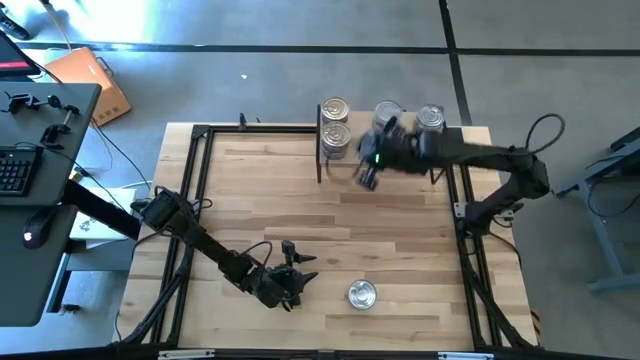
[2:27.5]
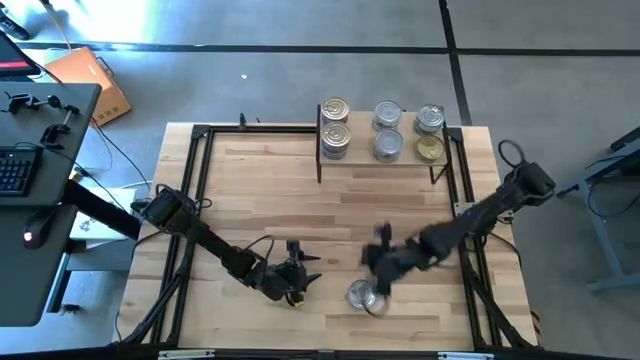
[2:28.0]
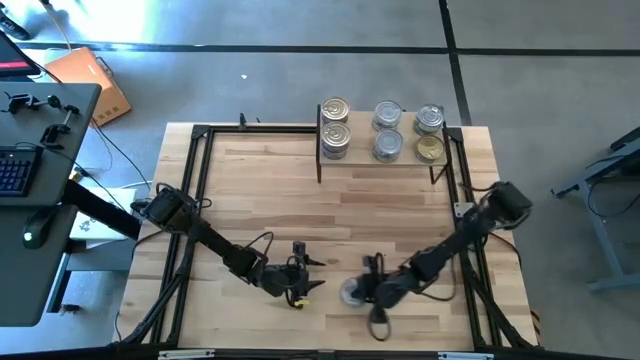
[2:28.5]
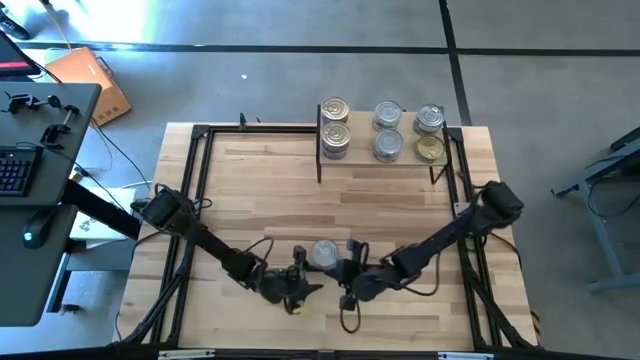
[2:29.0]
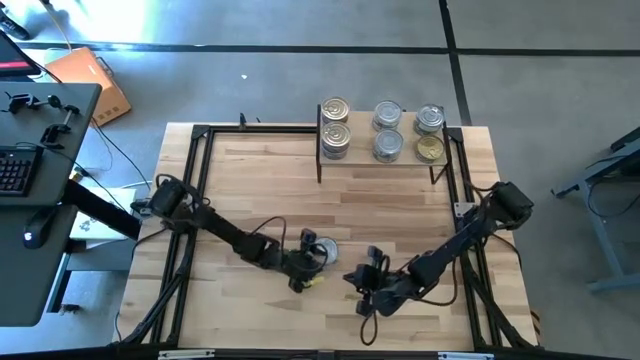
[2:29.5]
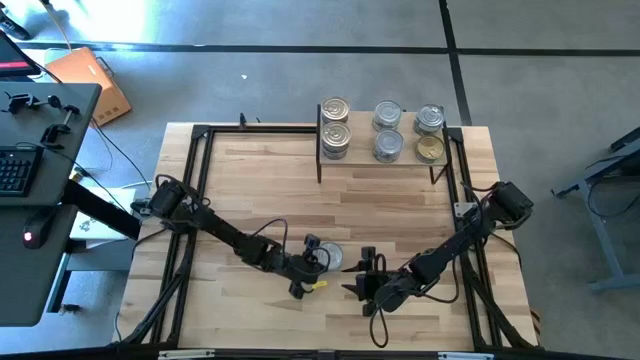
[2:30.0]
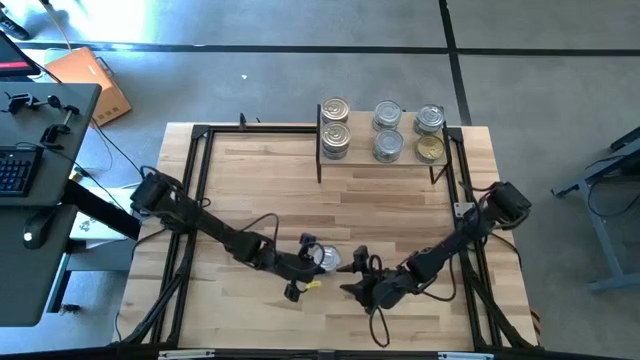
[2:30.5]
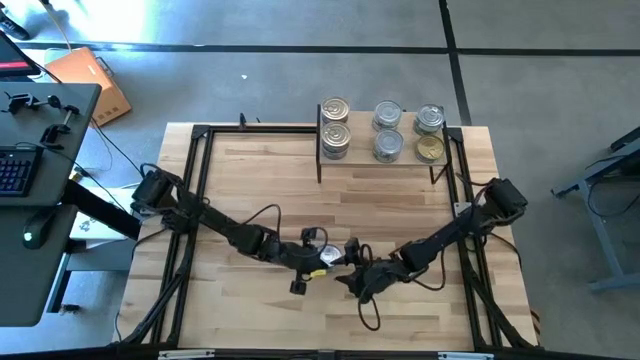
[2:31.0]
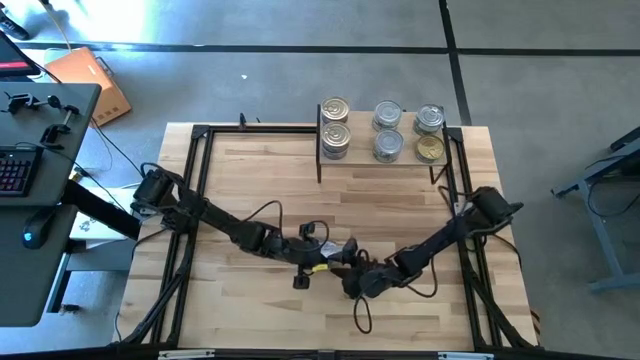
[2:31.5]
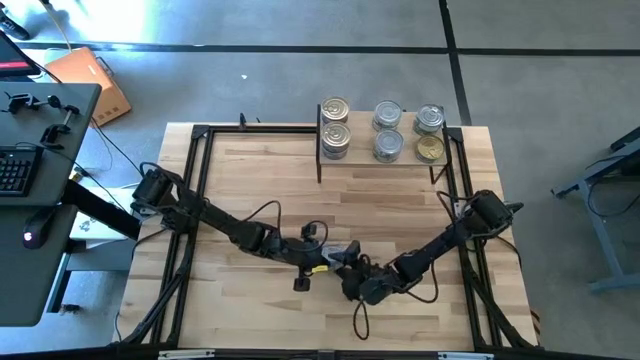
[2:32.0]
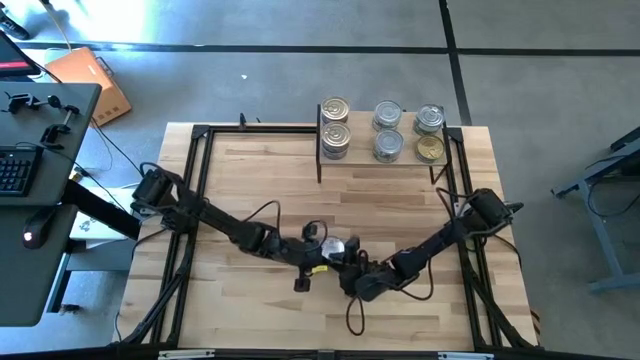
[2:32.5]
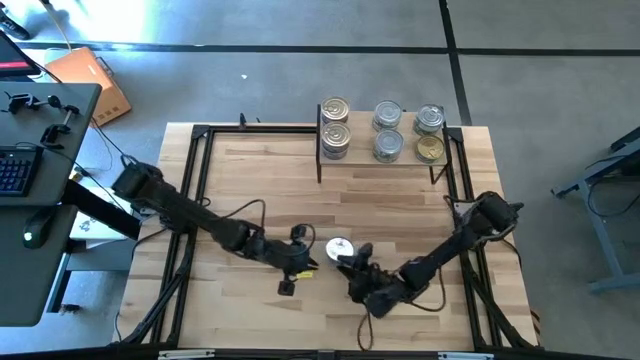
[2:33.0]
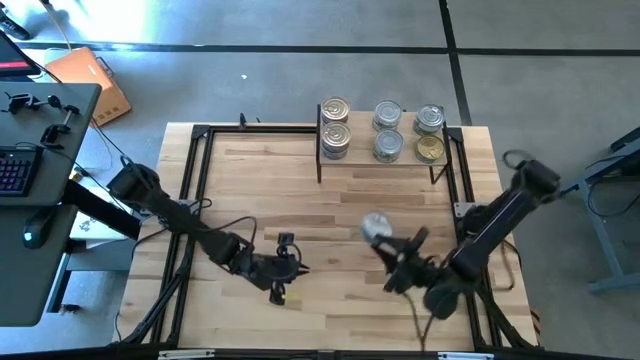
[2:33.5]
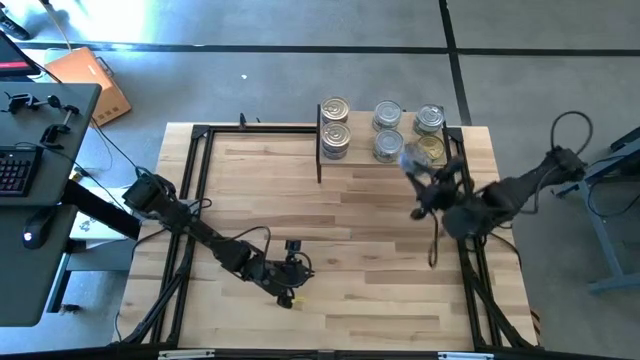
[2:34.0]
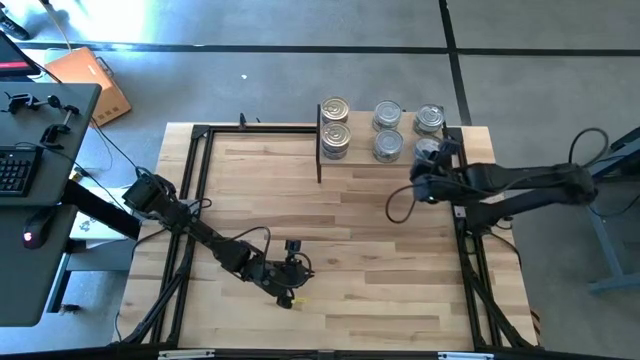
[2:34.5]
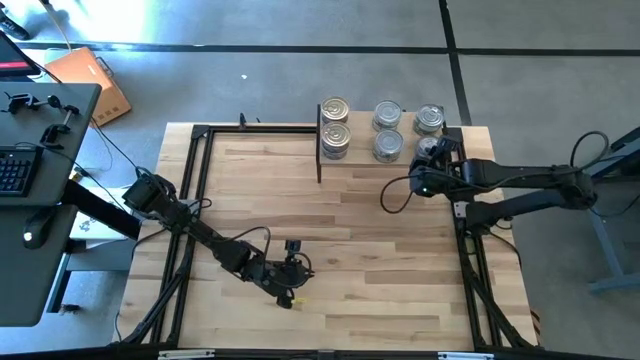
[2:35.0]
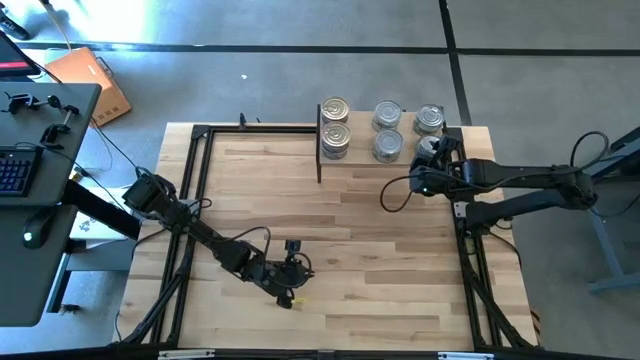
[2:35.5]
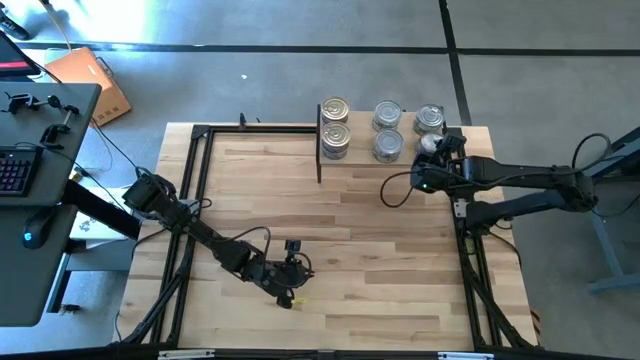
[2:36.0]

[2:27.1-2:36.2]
Task: Stack canned seafood by type on shelf
Stack the green tuna can on top of the other green tuna can on the shelf

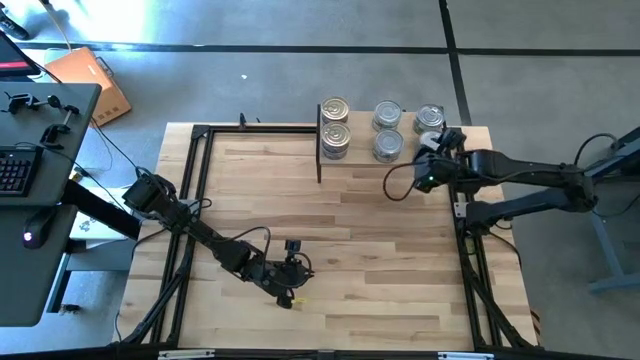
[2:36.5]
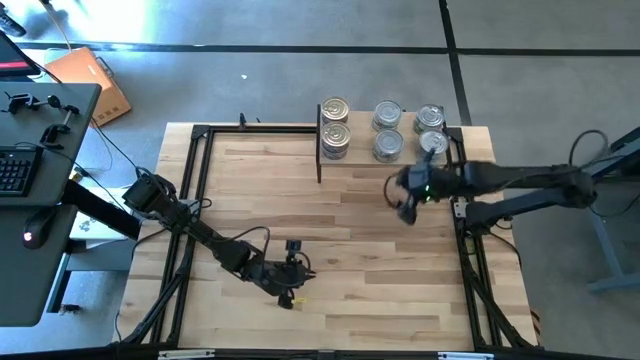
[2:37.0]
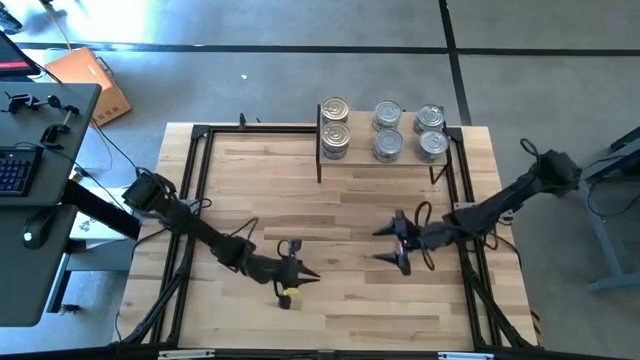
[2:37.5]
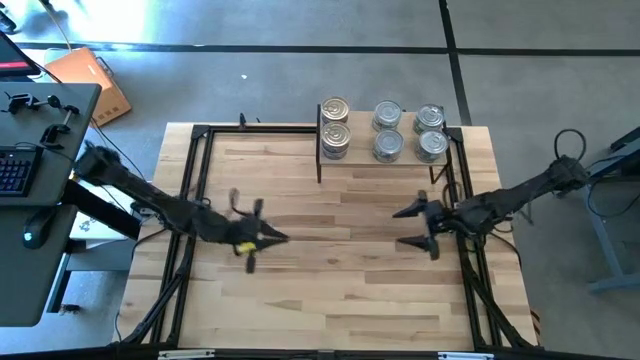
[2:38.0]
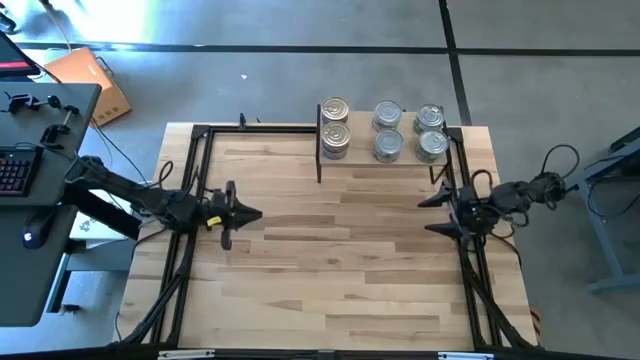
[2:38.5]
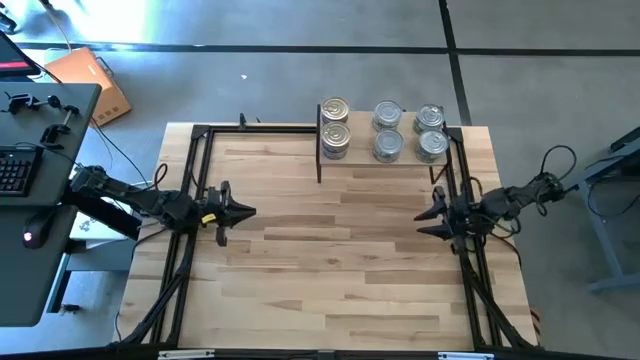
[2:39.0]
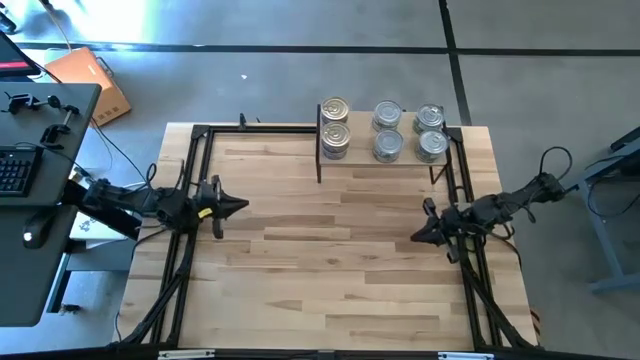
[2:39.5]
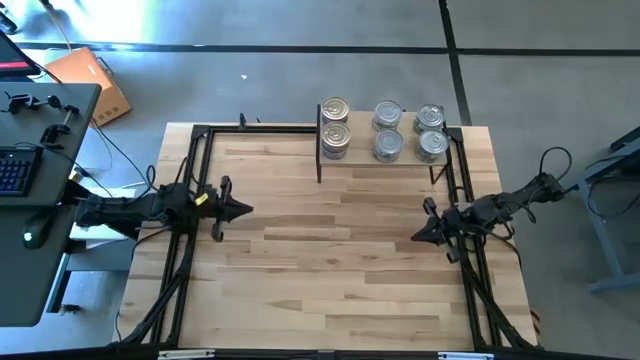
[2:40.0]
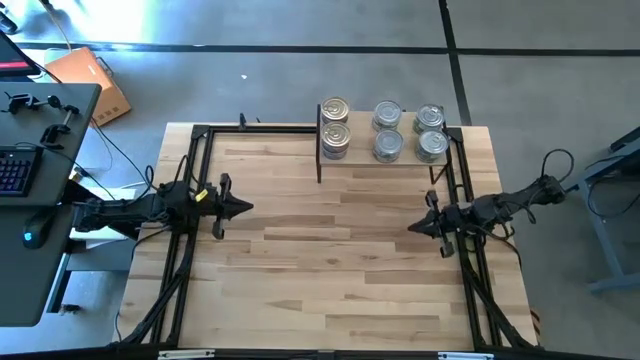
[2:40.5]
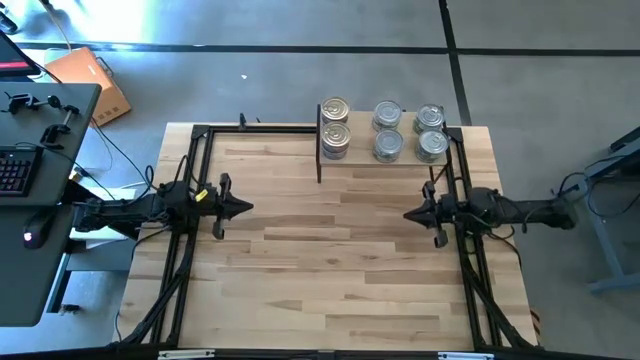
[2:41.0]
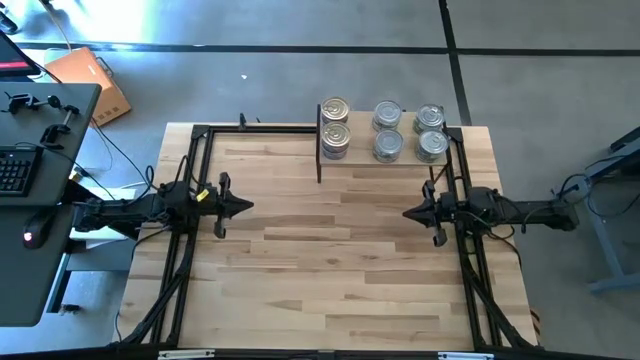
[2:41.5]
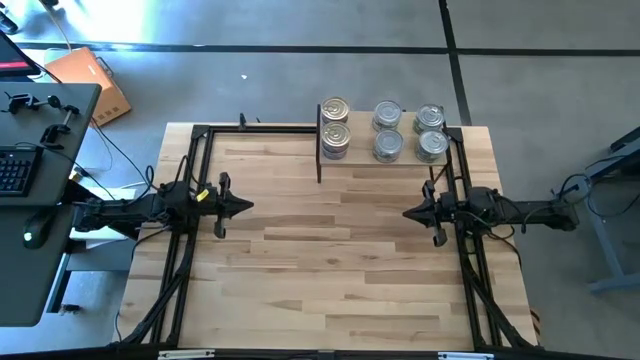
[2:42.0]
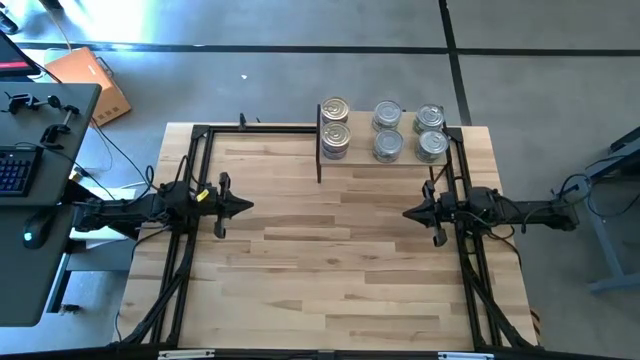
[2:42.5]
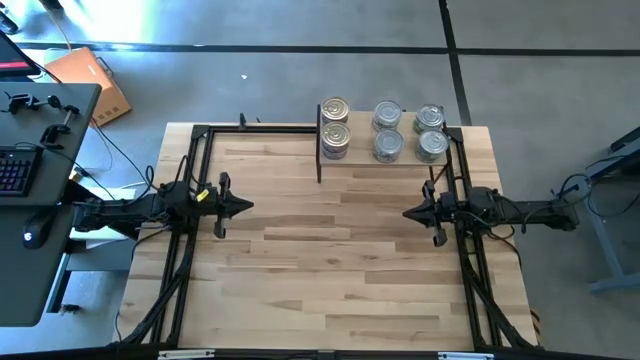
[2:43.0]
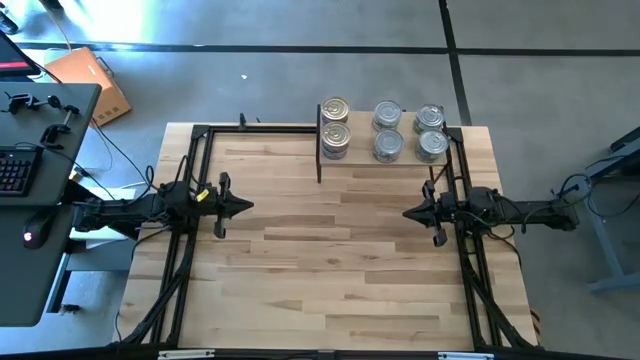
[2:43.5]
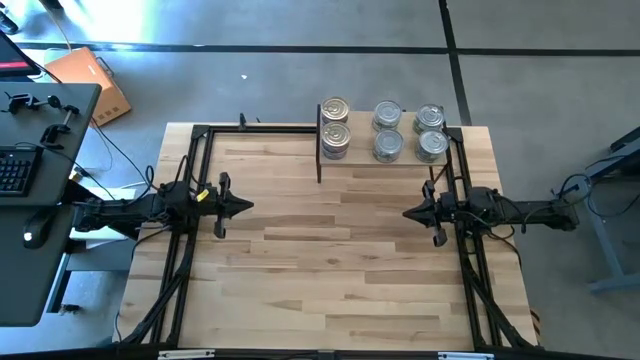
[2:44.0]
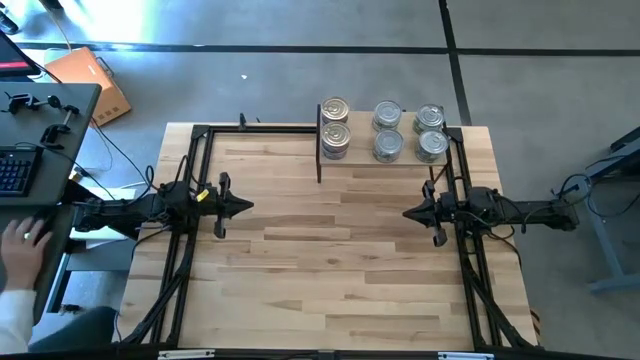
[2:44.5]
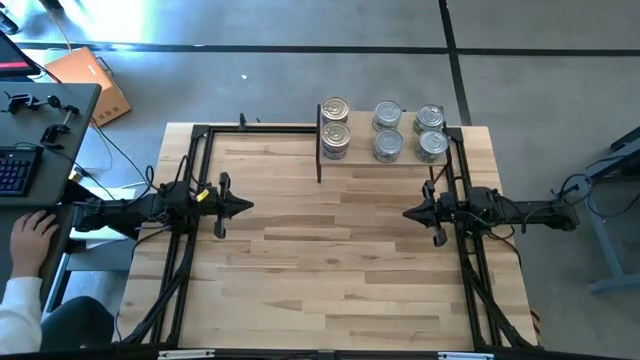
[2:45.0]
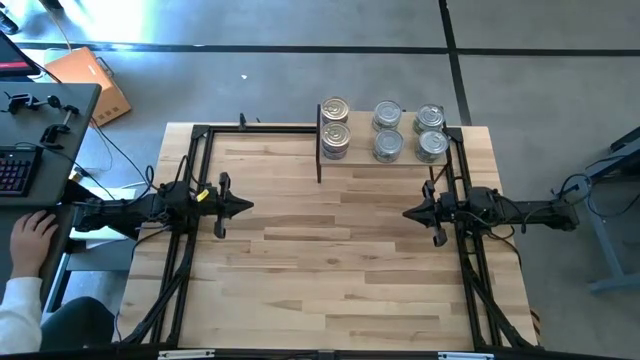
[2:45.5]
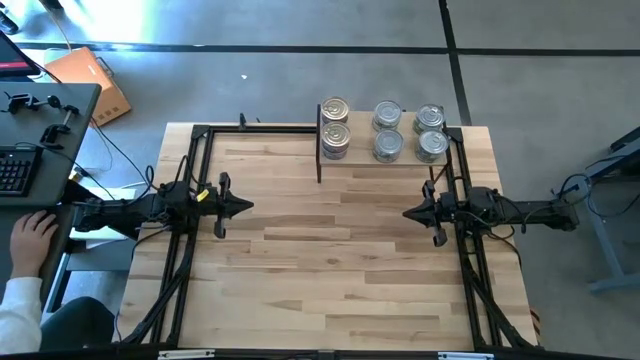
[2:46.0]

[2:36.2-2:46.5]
Return to Home Position

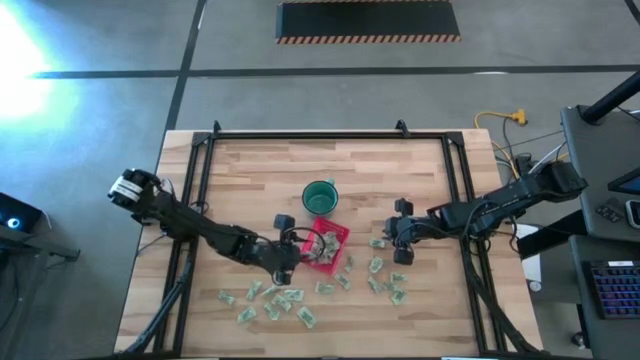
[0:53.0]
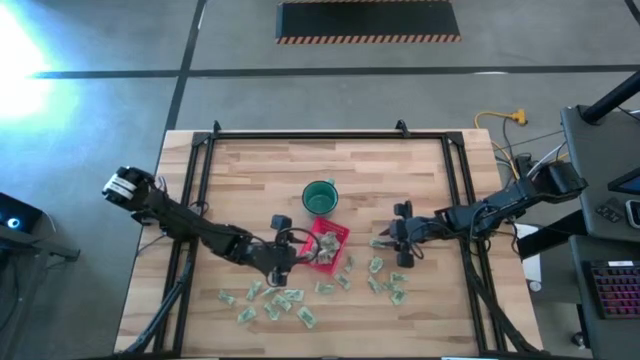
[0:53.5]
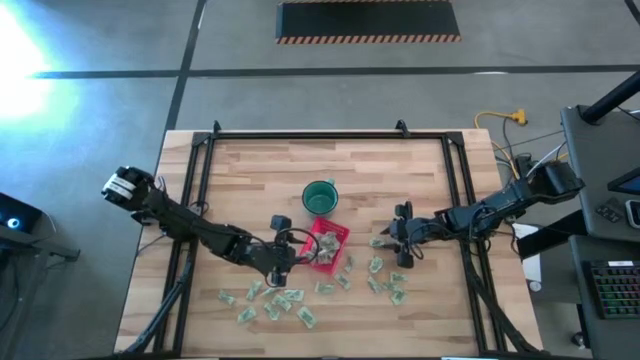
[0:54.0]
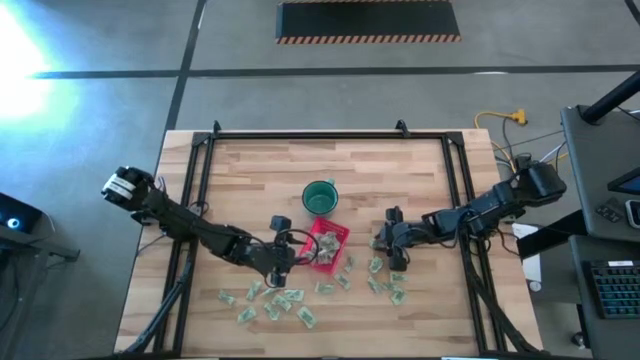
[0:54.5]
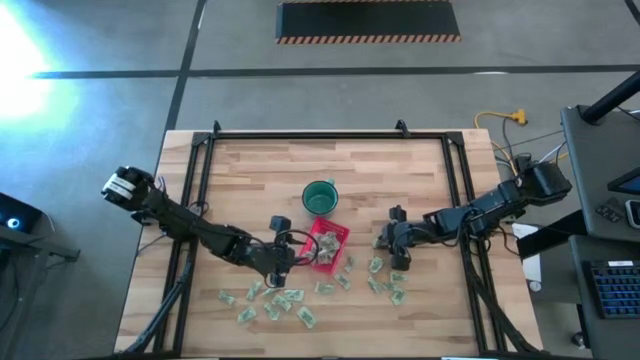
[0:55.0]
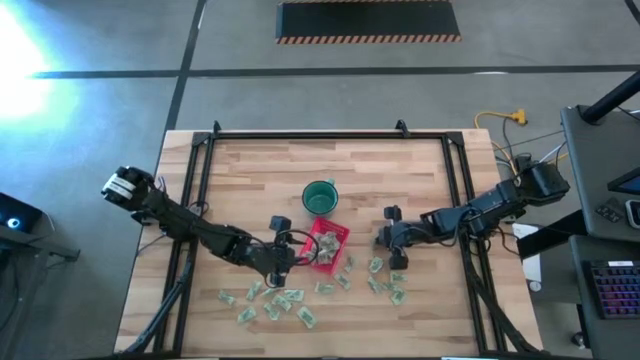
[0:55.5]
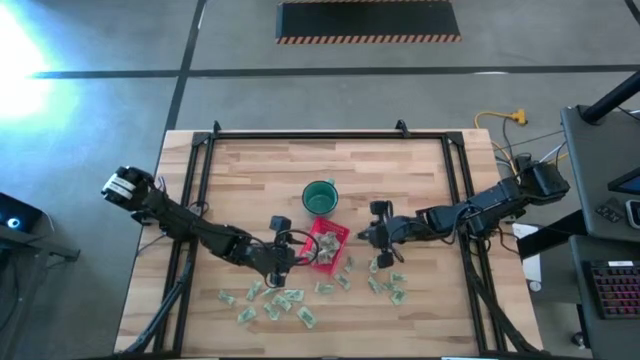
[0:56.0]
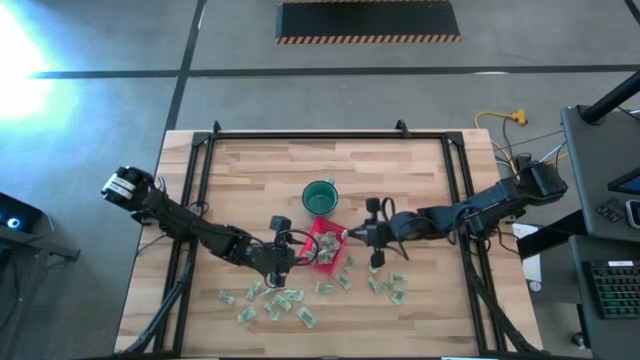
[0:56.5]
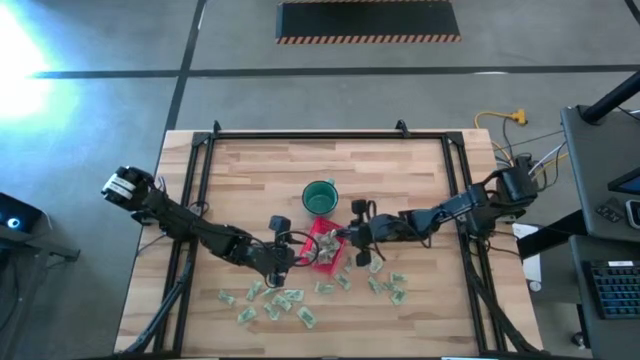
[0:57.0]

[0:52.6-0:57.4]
Task: Pick and place items into bin
Put the light green stevia packet into the red bin
